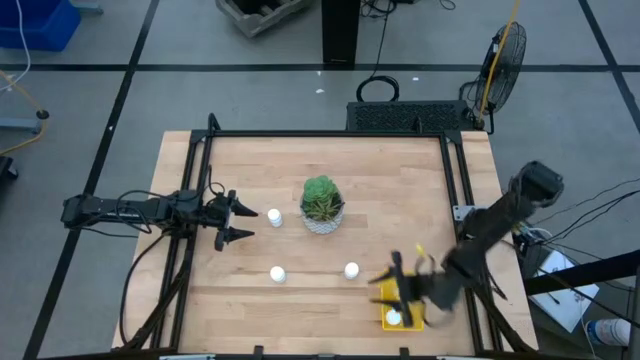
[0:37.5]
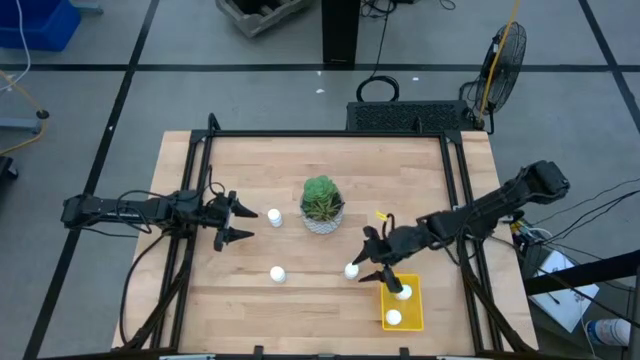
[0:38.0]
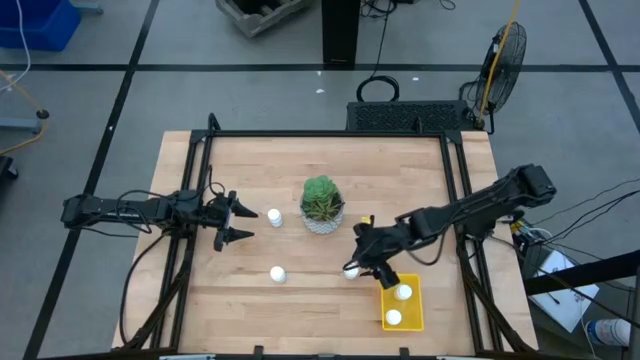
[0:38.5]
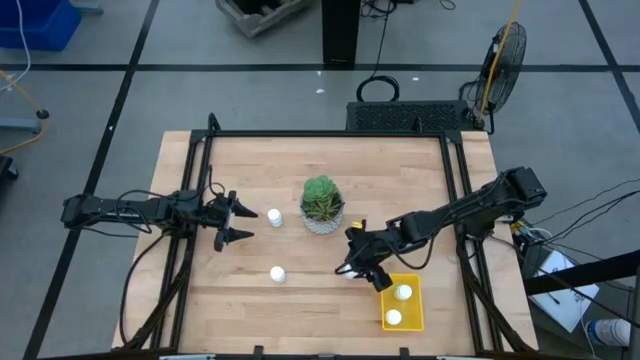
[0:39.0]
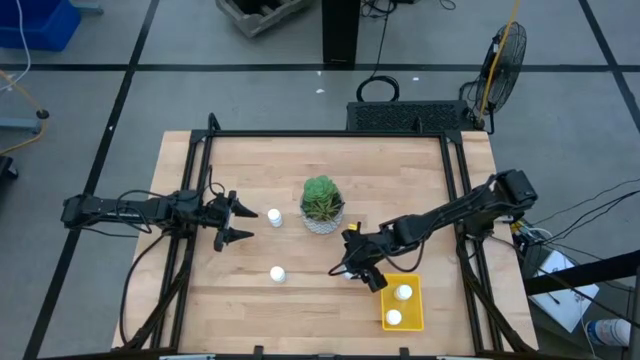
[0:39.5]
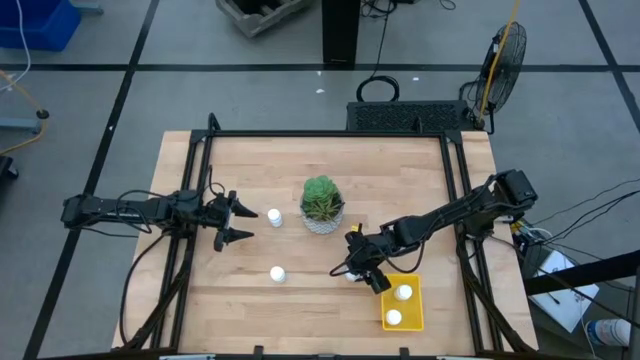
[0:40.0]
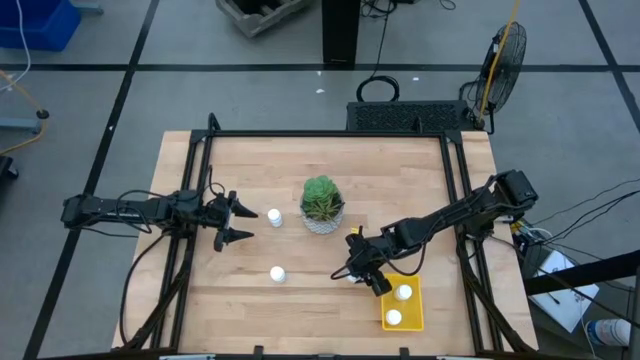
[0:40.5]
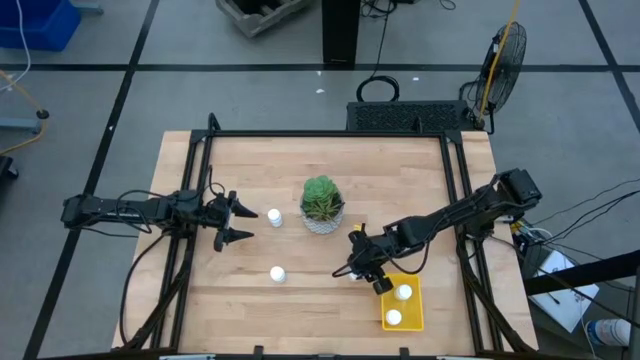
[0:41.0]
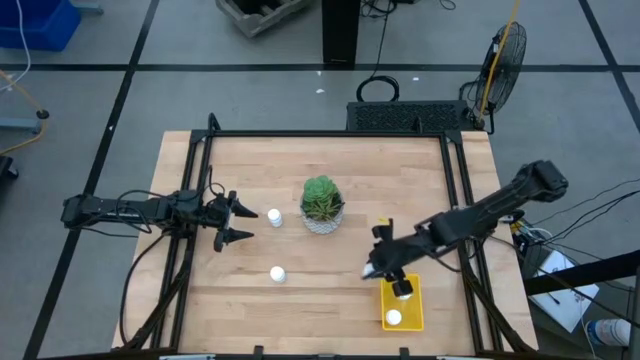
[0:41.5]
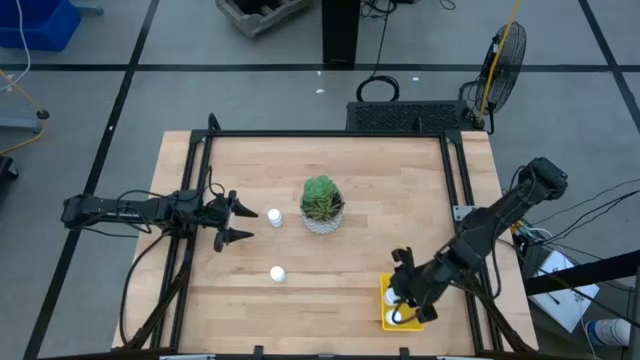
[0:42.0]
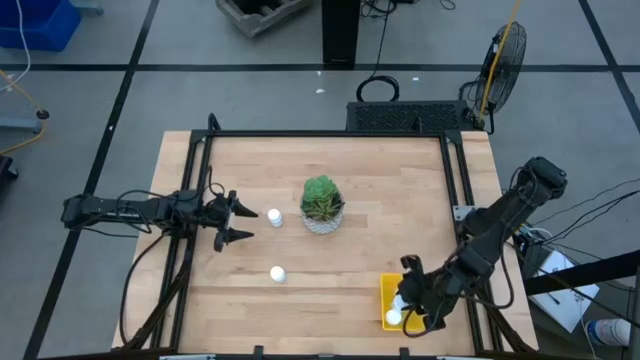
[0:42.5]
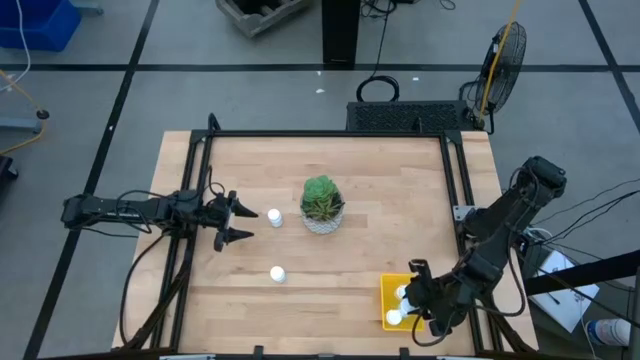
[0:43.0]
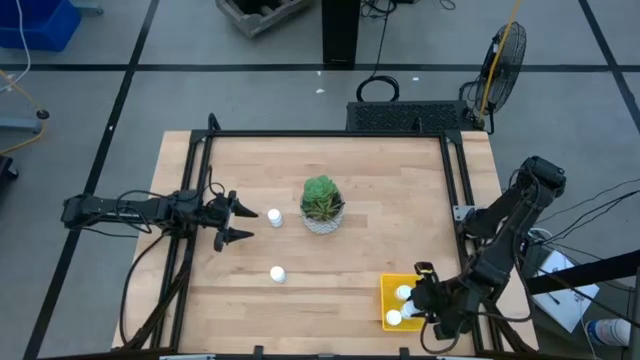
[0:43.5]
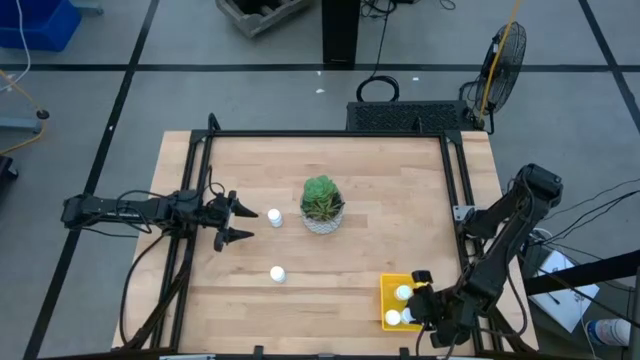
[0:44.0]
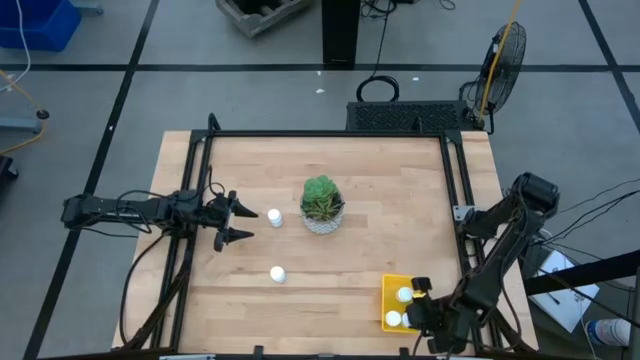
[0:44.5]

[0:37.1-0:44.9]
Task: Pick and place pill bottles into a basket
Put the white pill bottle into the bin

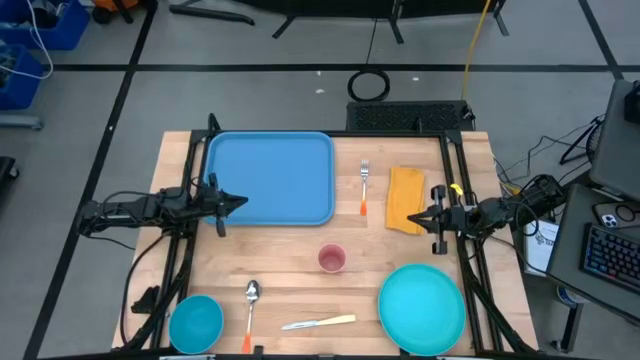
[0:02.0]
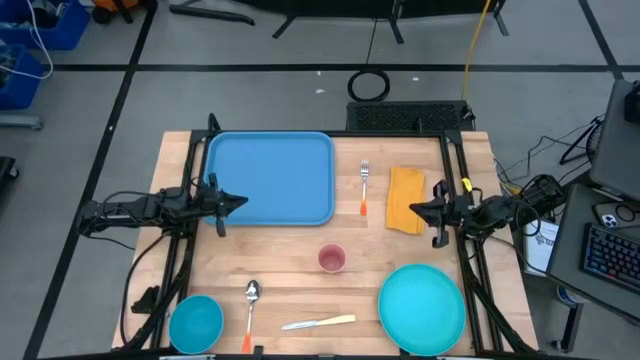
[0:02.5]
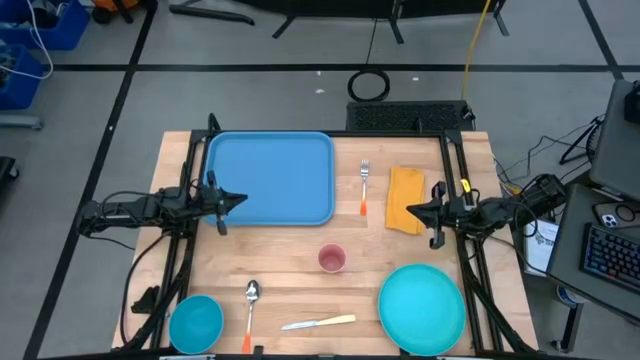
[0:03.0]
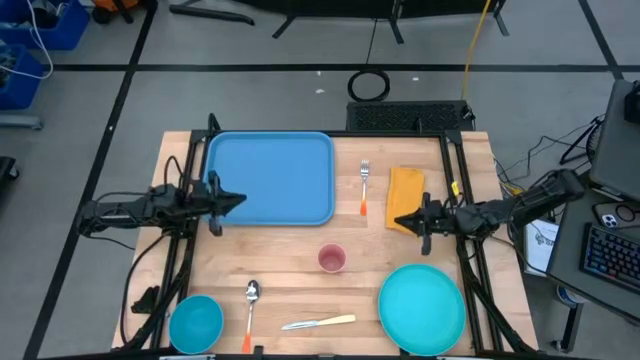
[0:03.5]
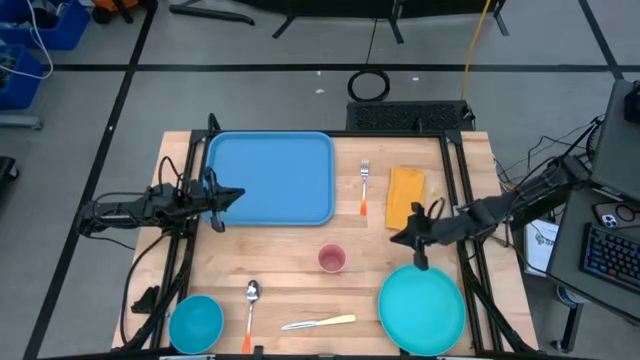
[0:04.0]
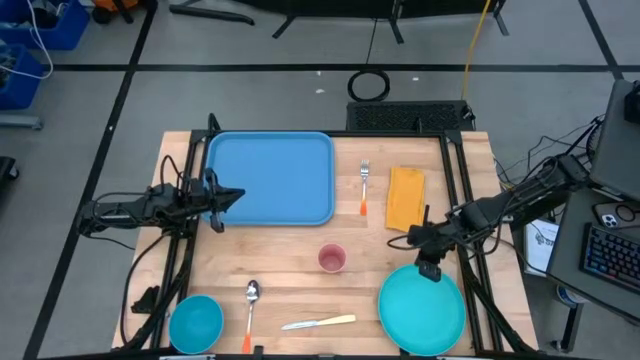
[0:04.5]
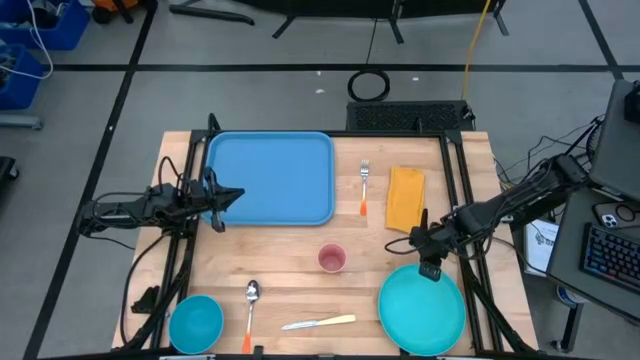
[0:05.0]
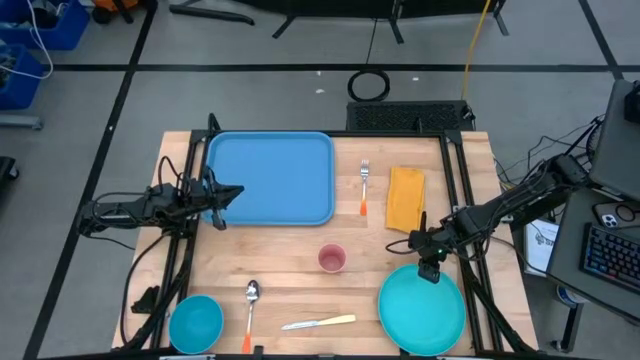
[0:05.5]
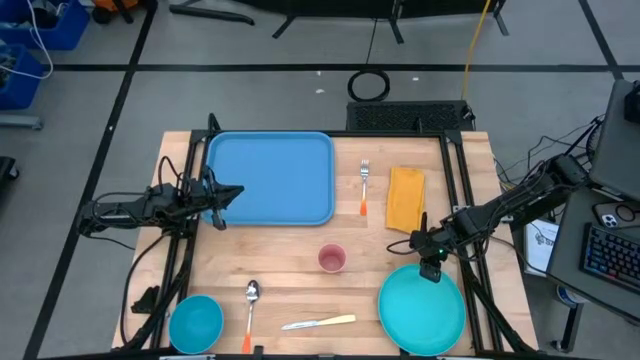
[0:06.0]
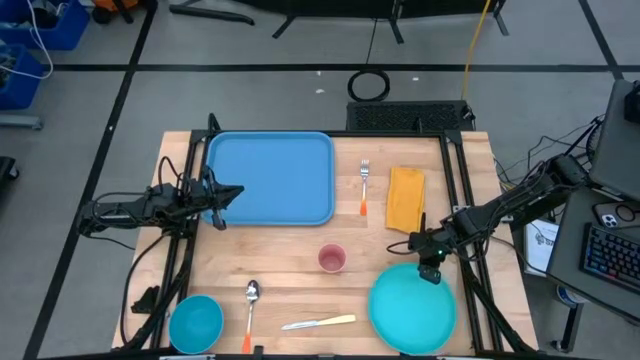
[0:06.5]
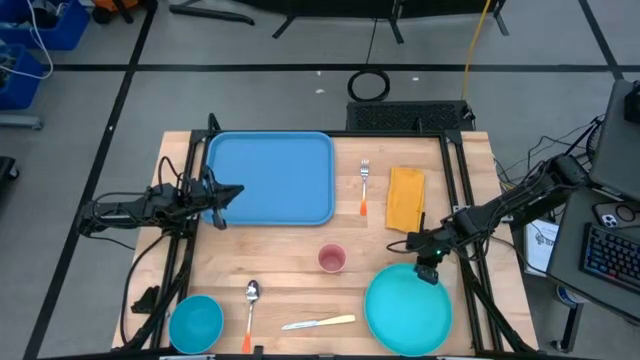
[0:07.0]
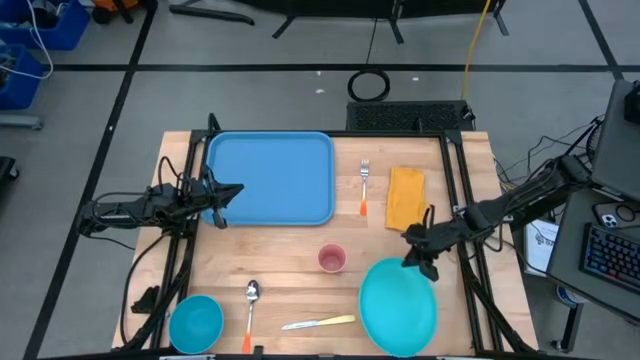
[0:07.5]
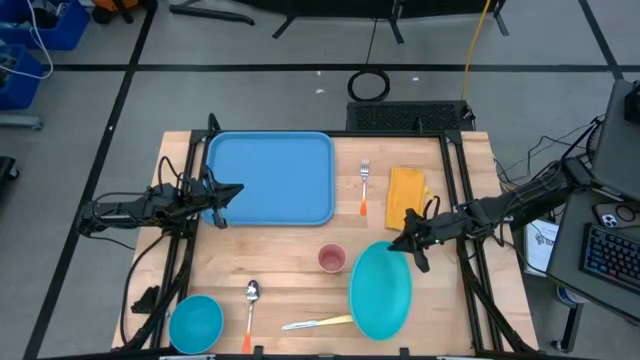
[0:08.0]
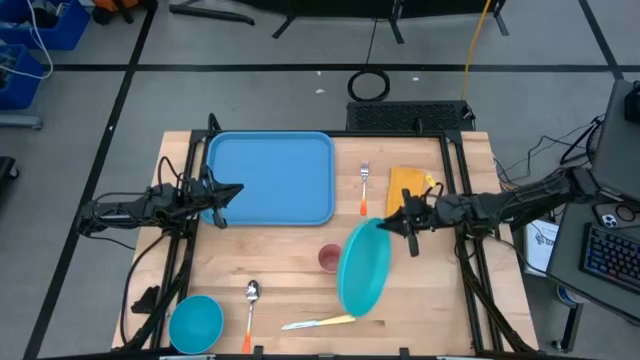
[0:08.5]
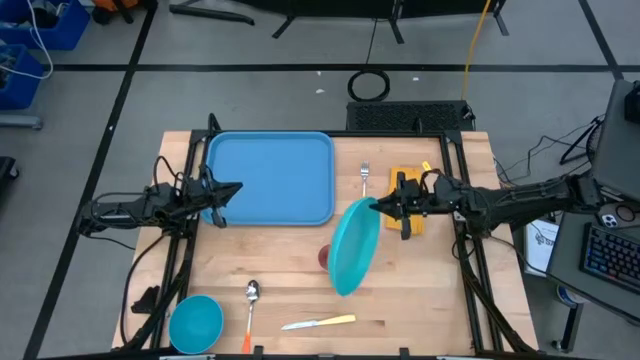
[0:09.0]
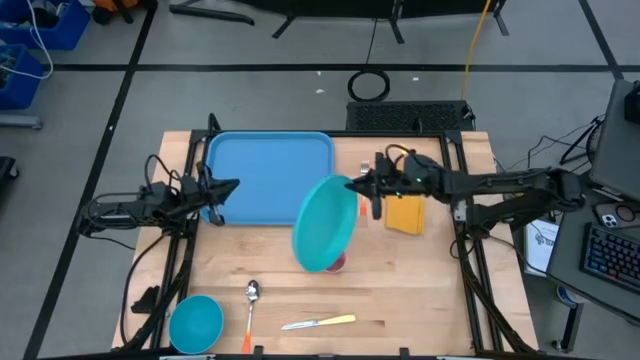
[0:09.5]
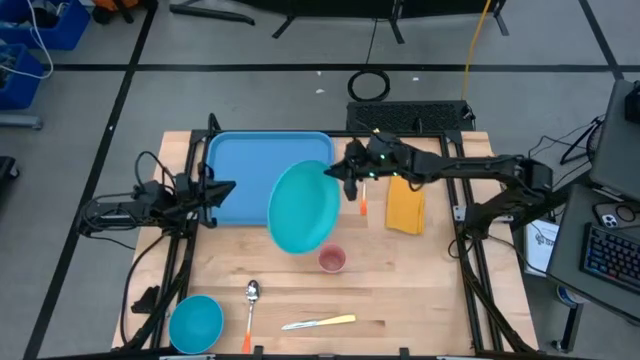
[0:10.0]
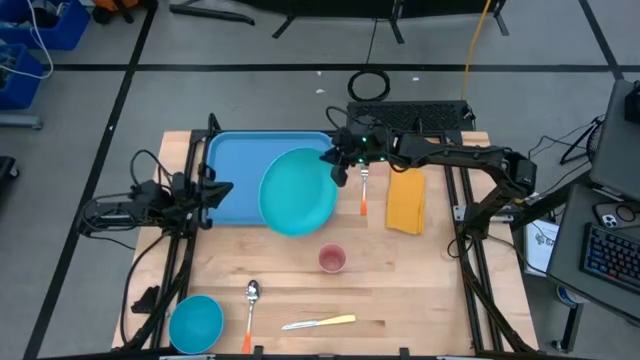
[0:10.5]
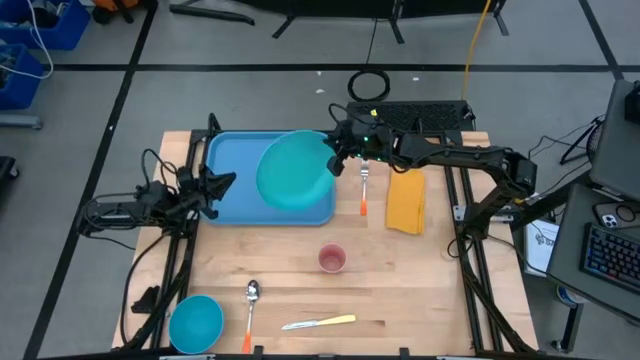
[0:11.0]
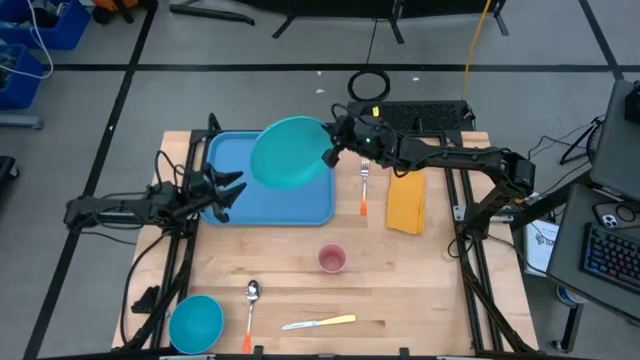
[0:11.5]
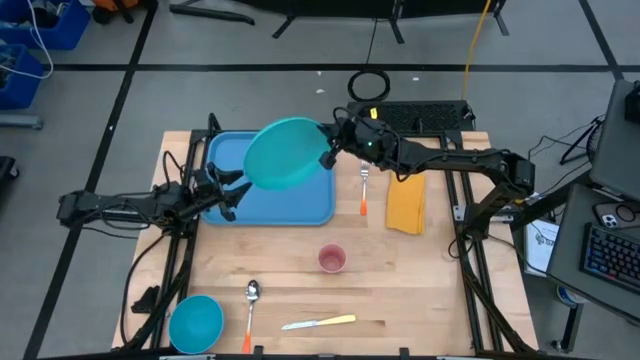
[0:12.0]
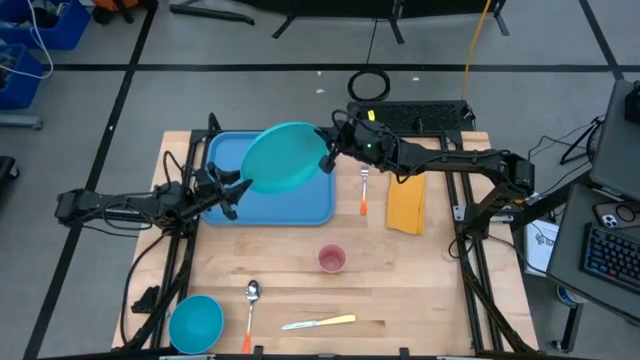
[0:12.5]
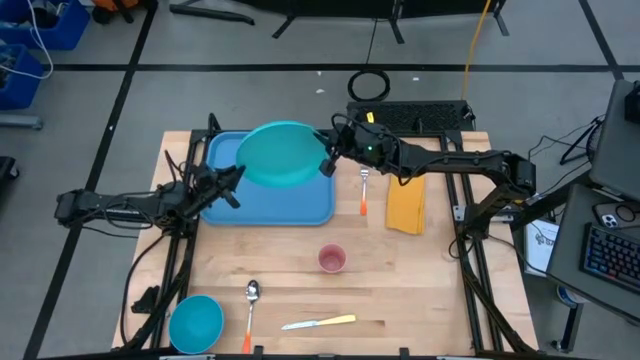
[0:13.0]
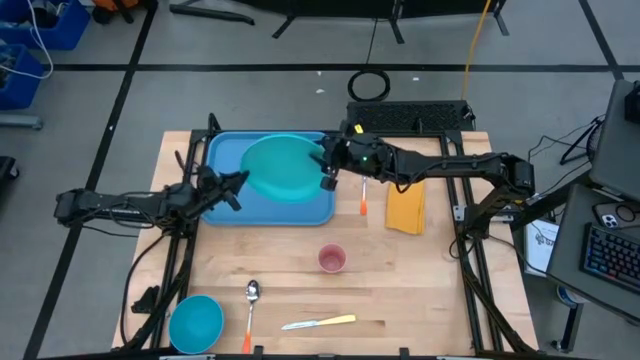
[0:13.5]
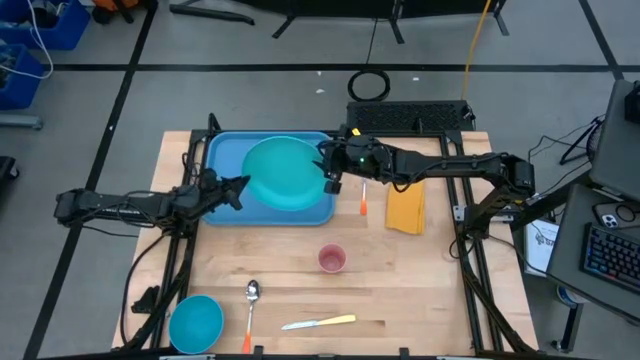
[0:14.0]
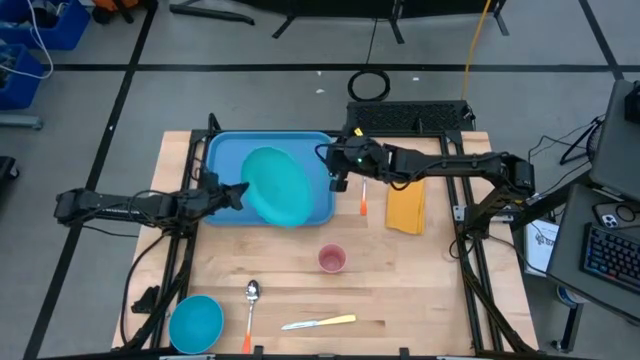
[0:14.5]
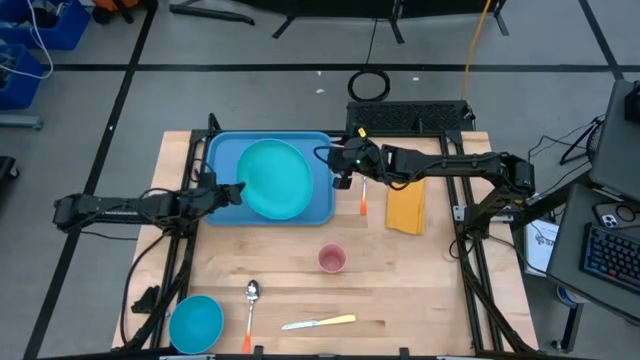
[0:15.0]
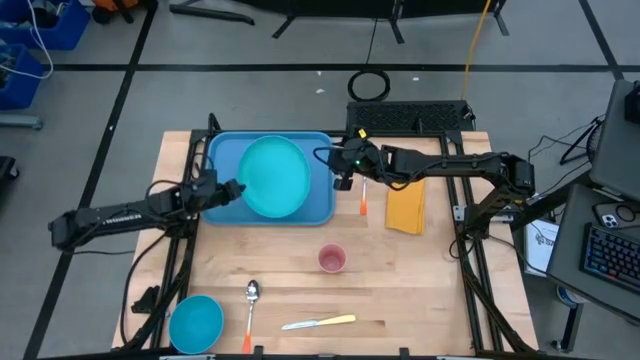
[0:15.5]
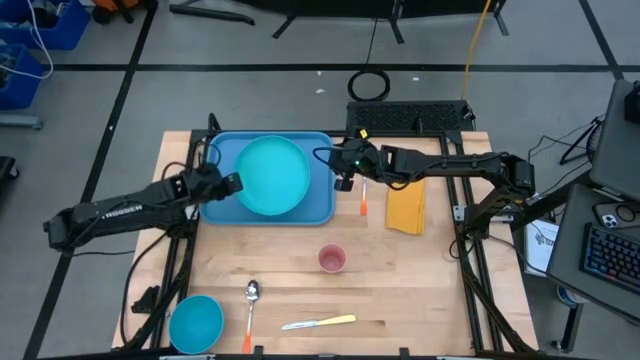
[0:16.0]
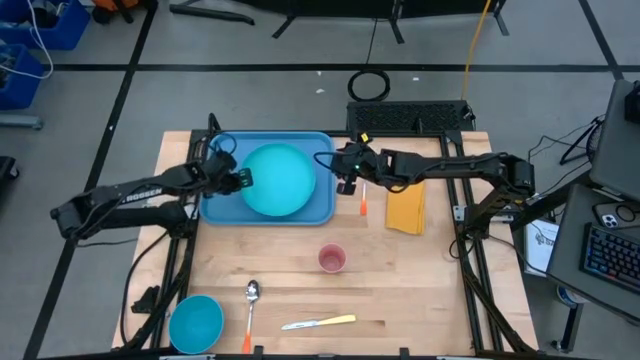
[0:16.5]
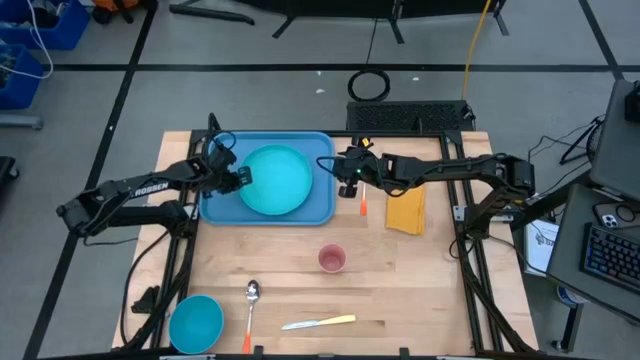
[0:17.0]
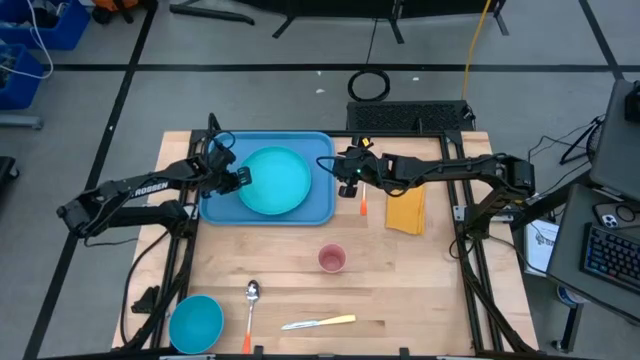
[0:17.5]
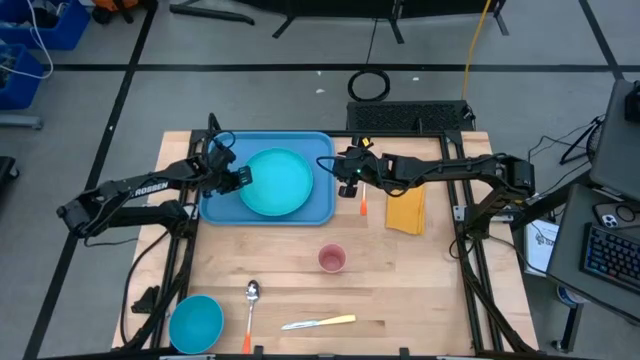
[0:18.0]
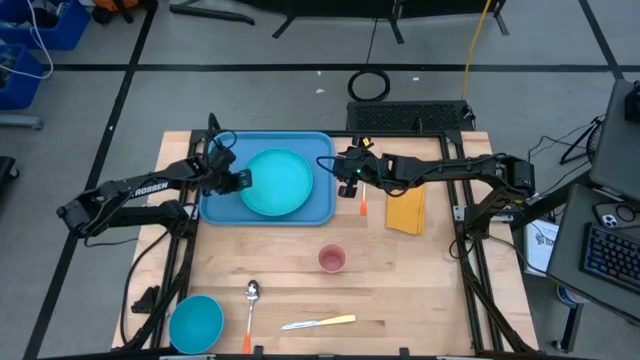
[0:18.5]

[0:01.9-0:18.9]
Task: Set up tray
Put the green plate on the blue serving tray
